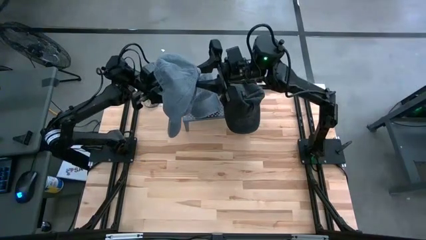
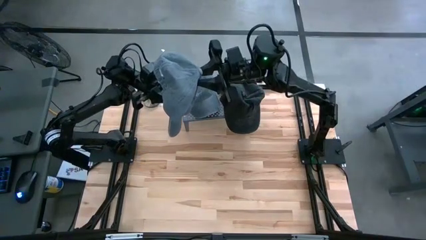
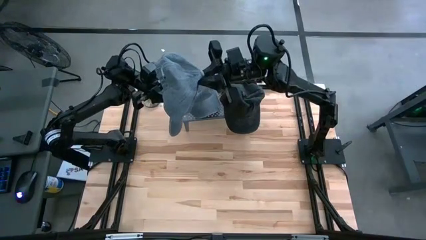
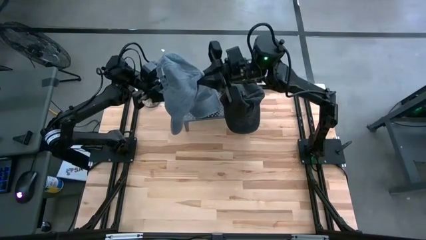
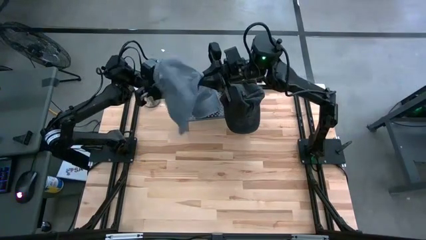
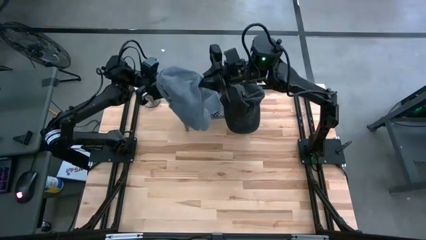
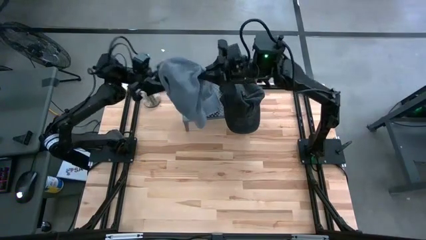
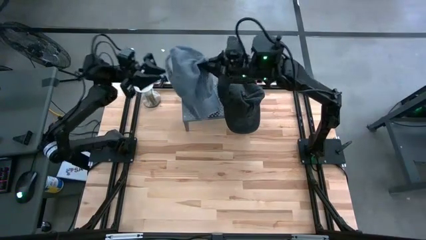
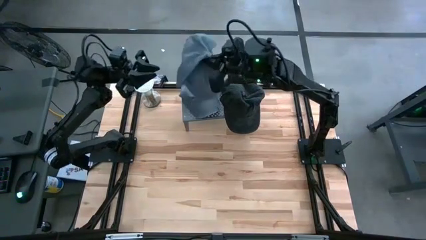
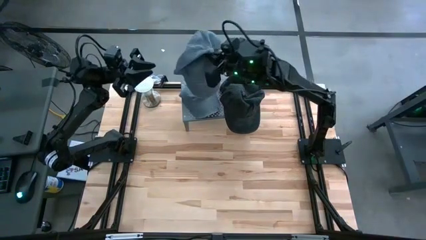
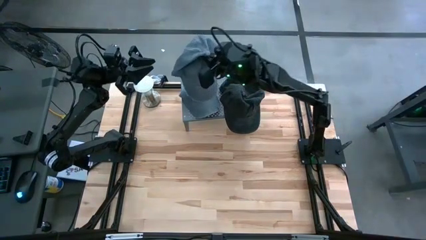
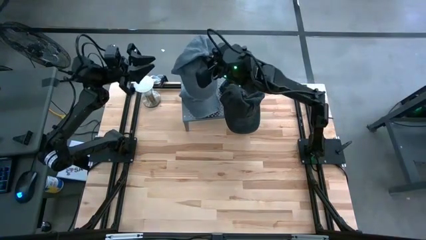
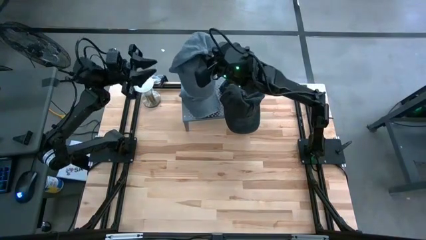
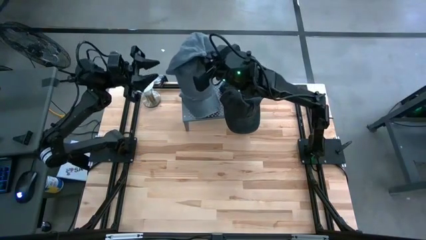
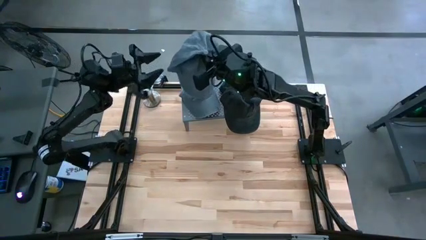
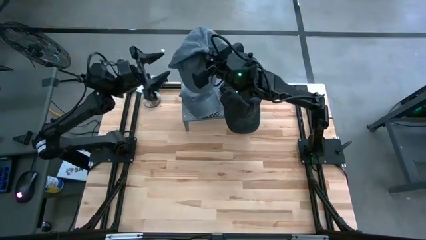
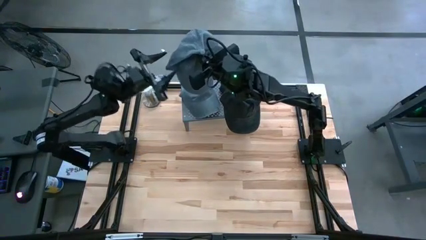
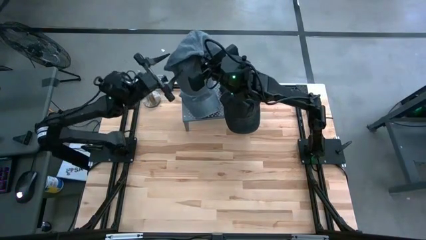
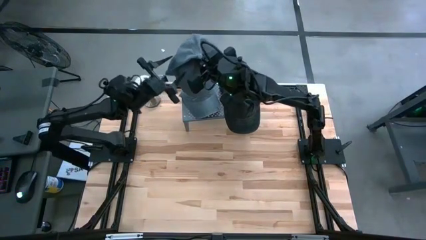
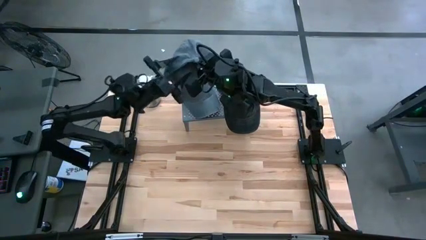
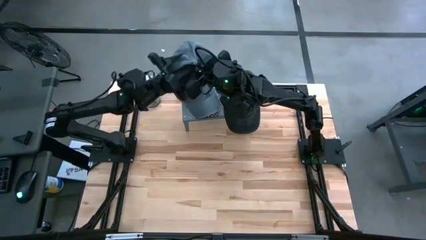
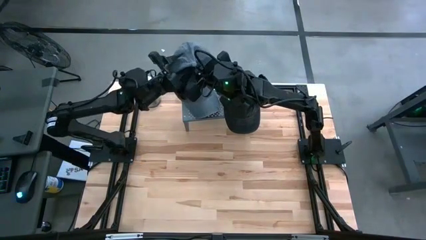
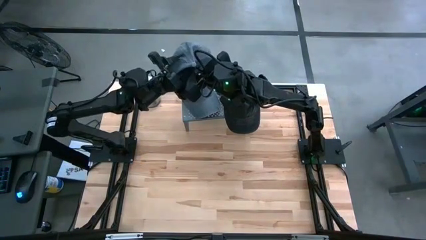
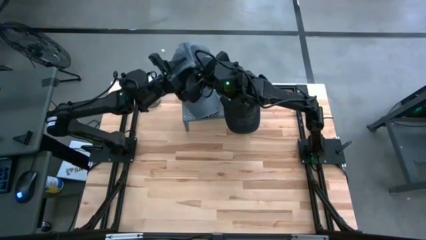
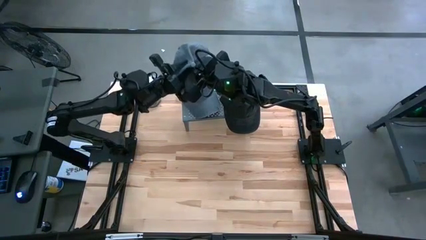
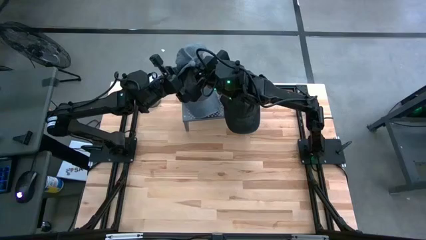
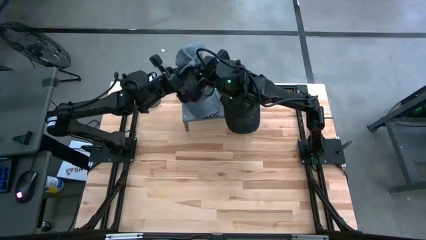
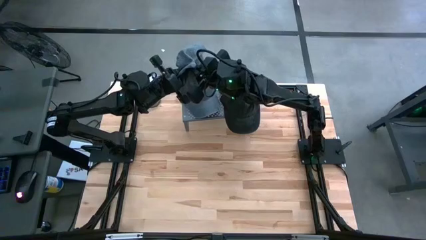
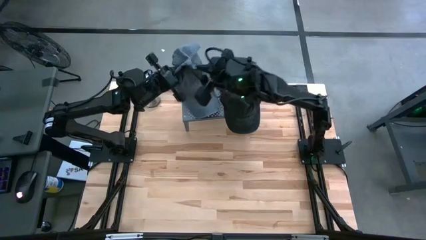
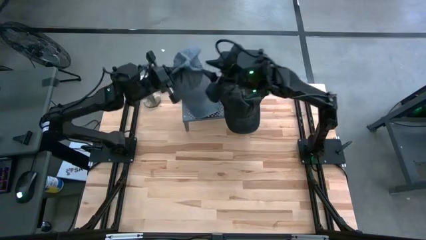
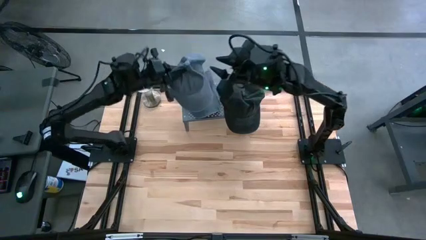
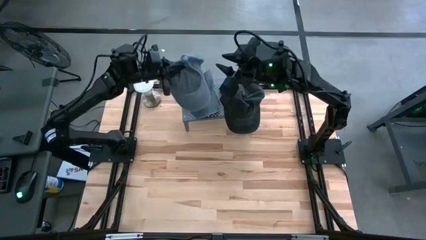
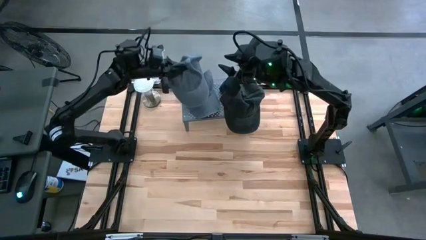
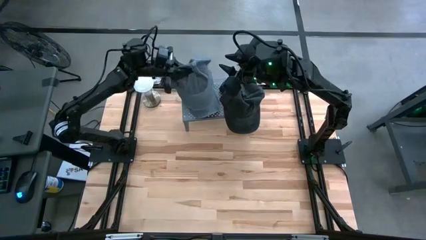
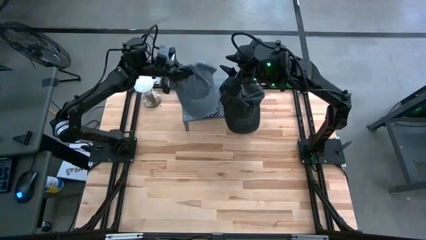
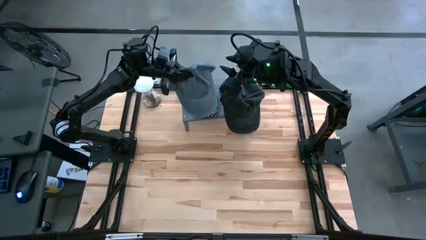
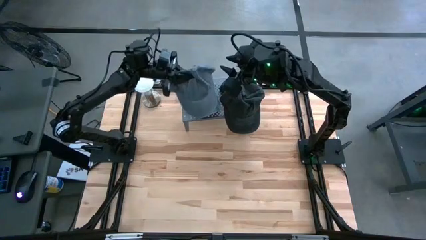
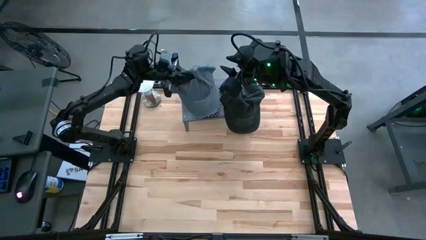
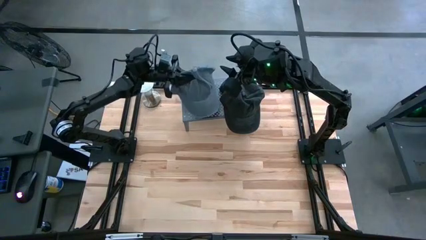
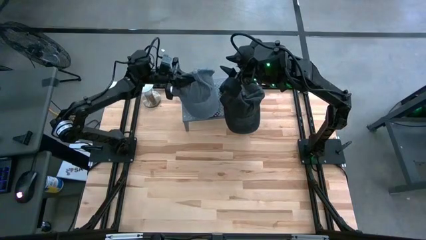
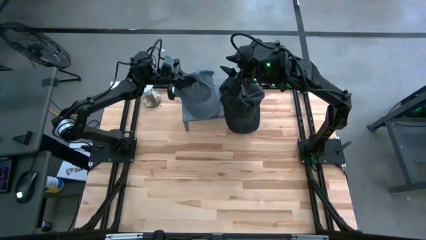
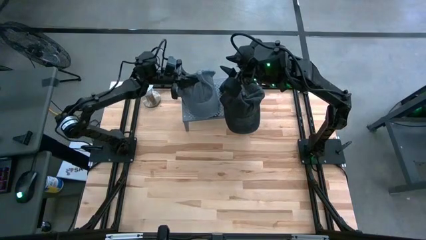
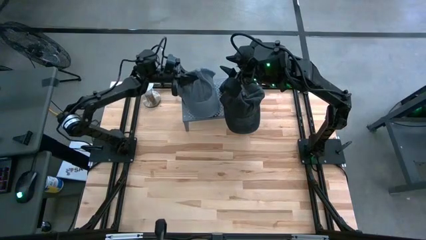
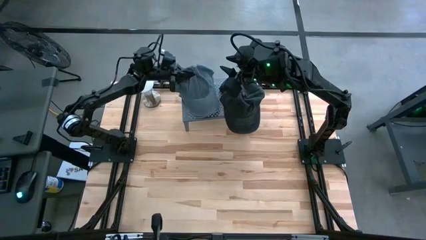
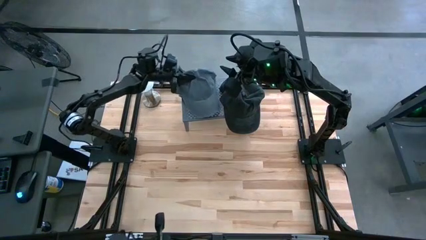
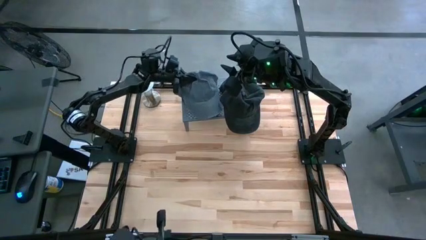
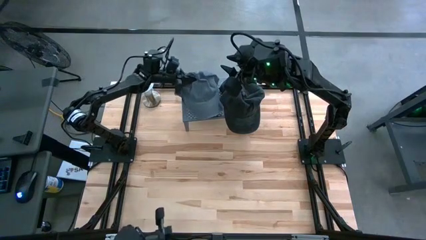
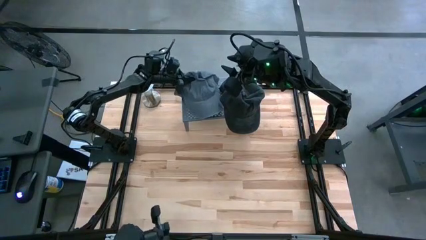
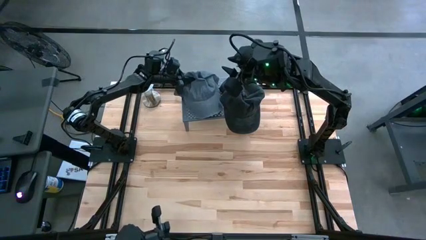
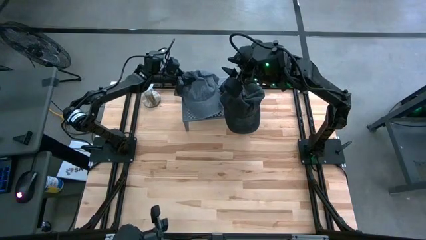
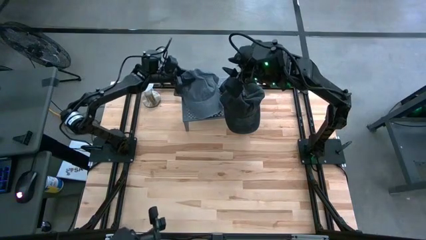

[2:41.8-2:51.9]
Task: Pick & Place hat
Stack the gray cap on top of the other gray cap on the shelf

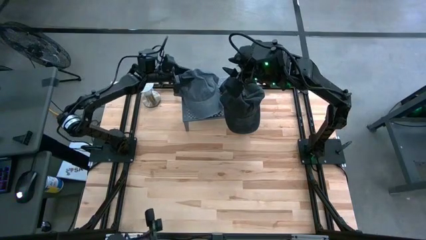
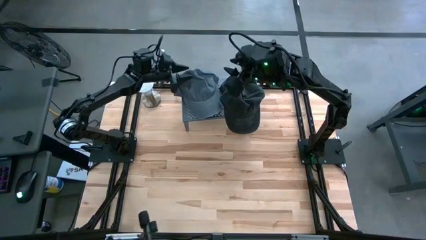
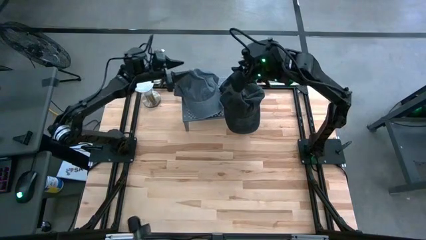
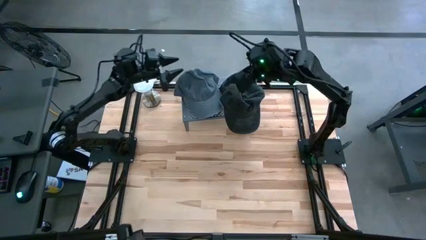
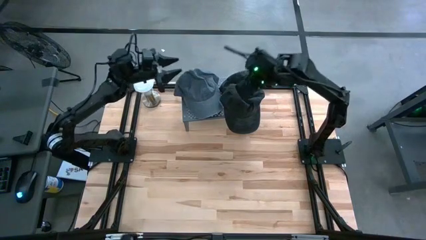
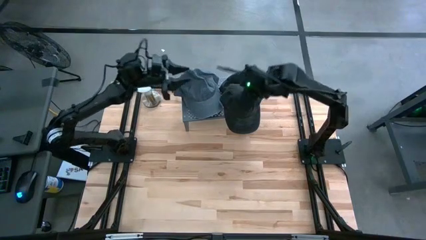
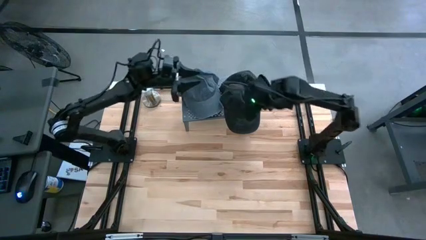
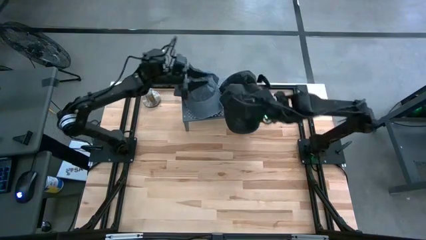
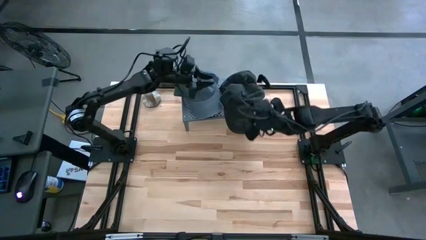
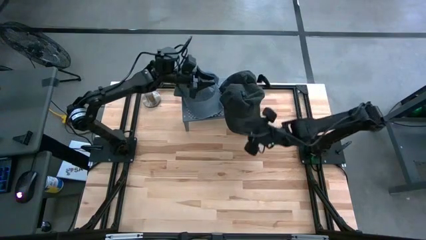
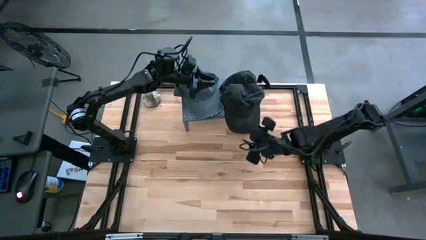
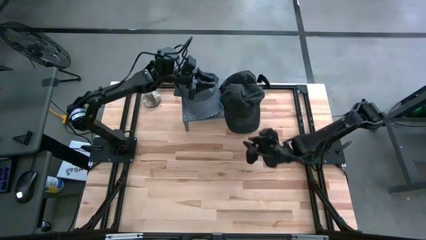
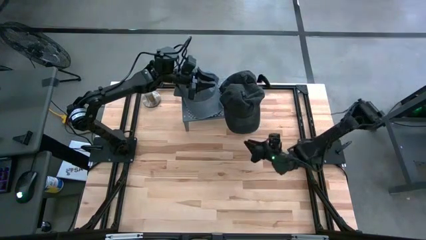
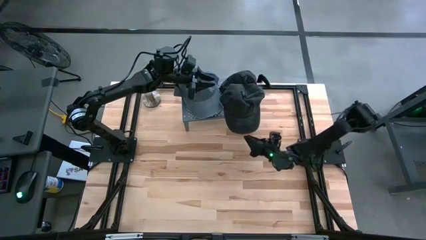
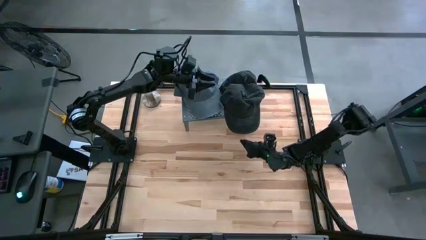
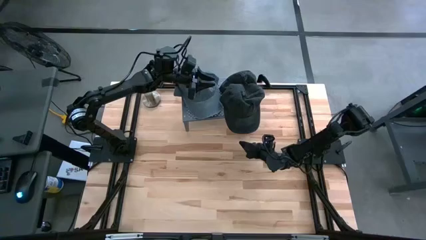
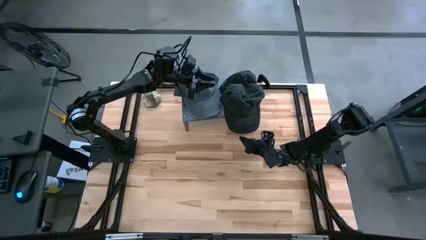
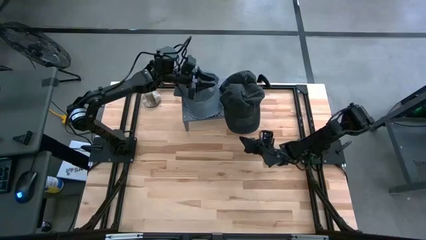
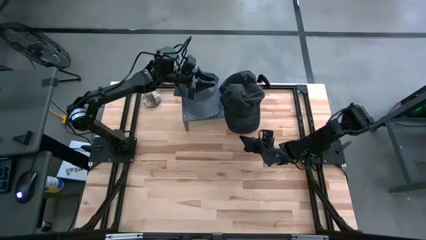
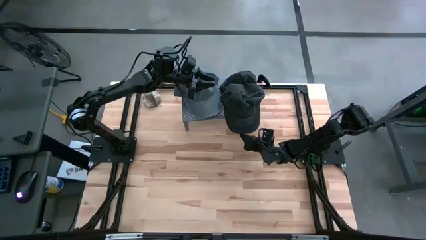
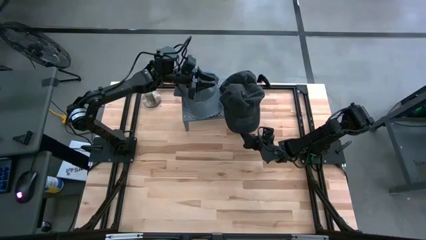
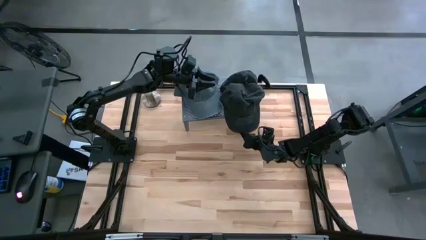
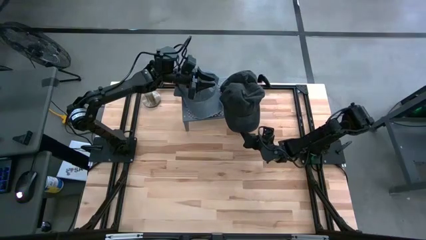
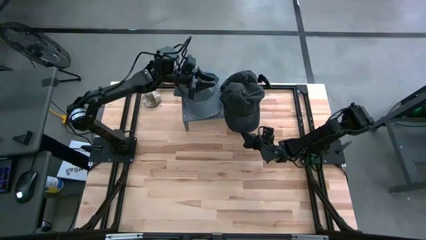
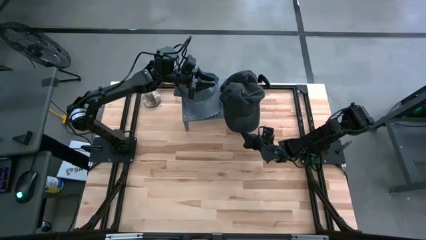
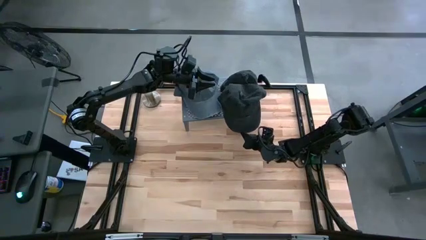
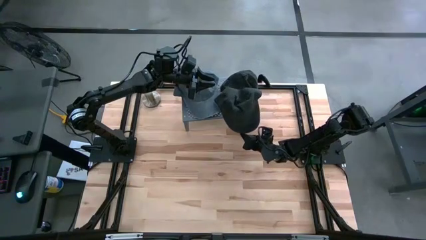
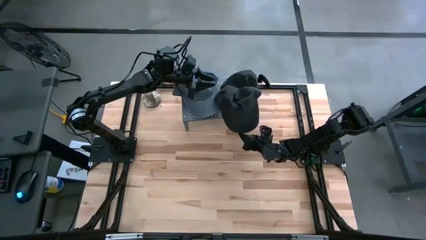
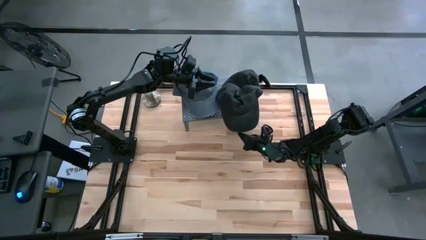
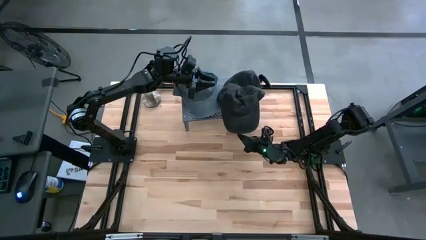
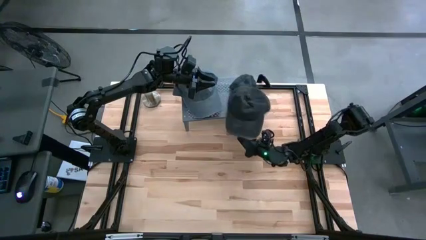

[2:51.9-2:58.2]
Adjust the black caps on the shelf
